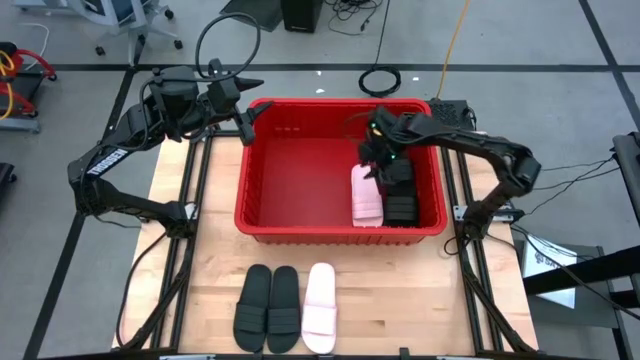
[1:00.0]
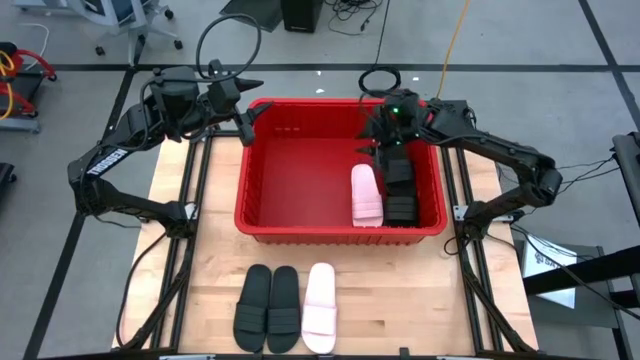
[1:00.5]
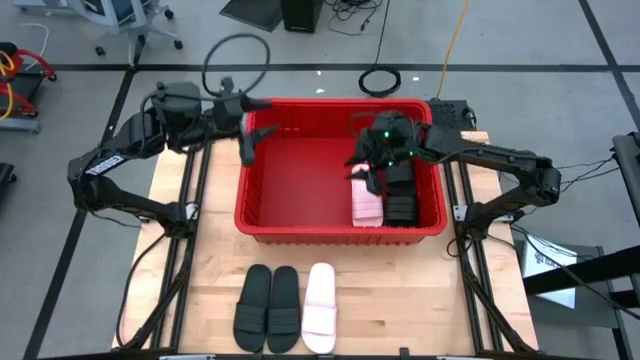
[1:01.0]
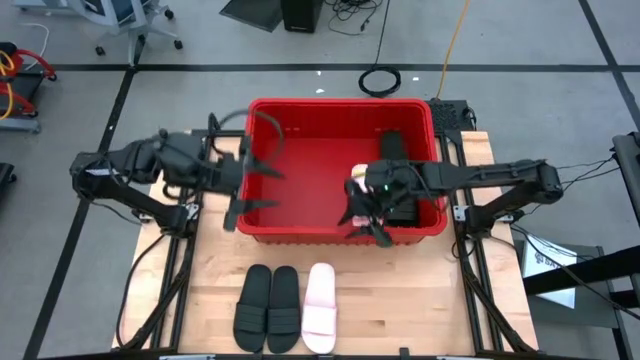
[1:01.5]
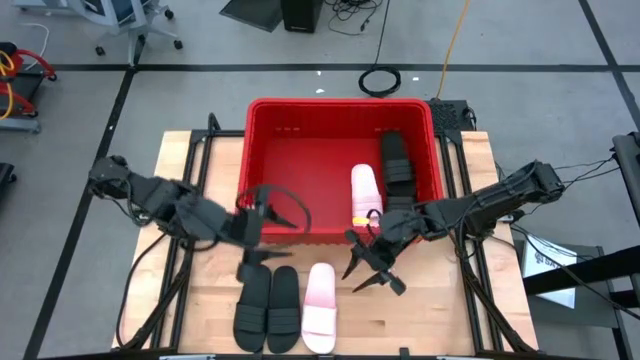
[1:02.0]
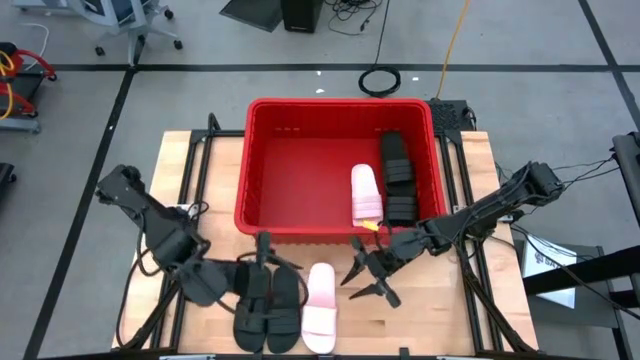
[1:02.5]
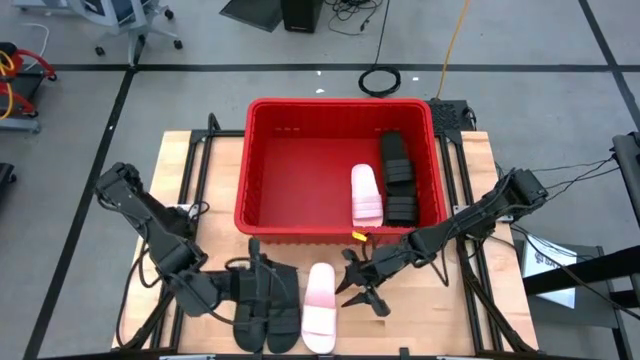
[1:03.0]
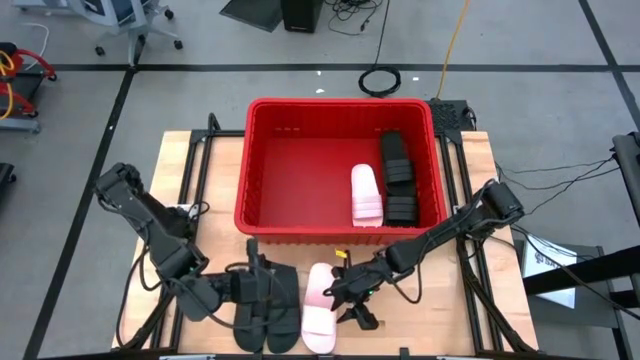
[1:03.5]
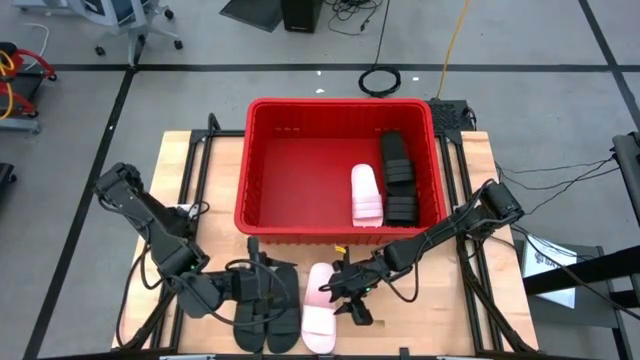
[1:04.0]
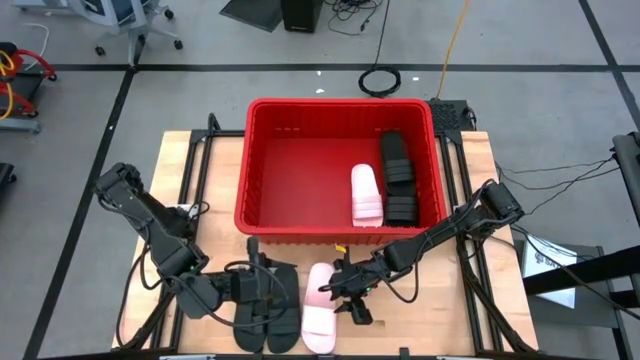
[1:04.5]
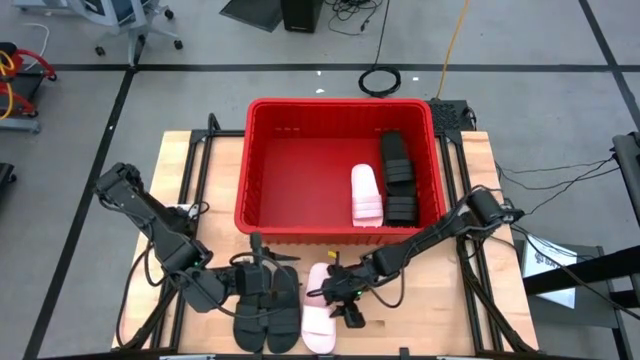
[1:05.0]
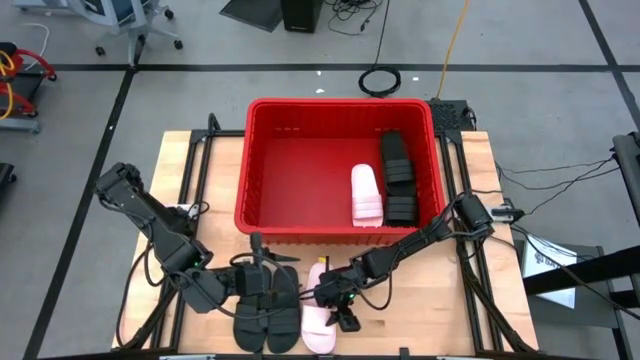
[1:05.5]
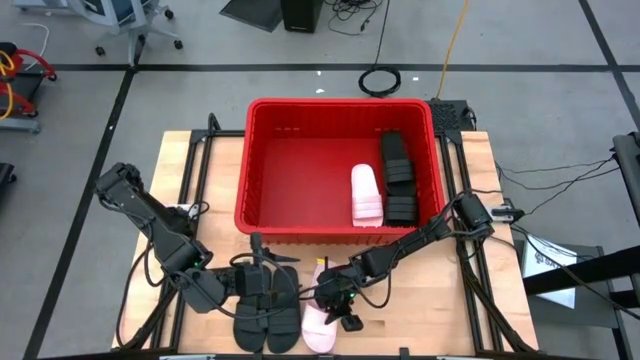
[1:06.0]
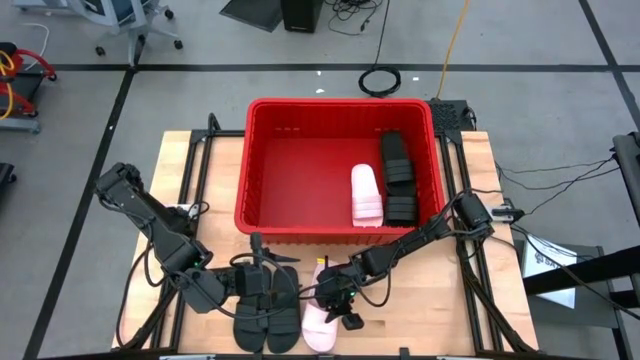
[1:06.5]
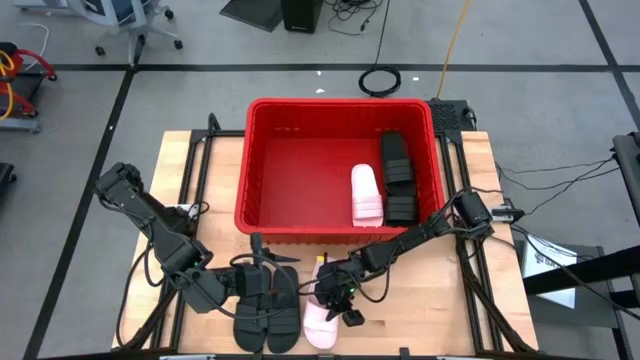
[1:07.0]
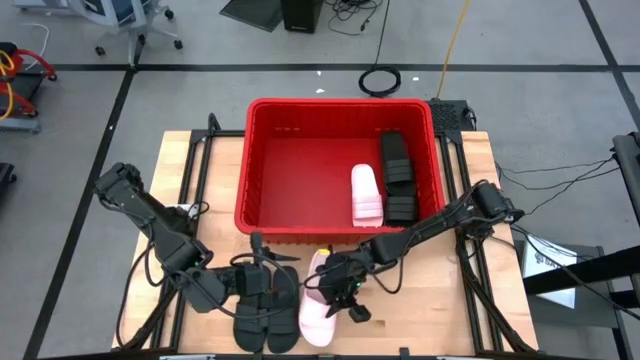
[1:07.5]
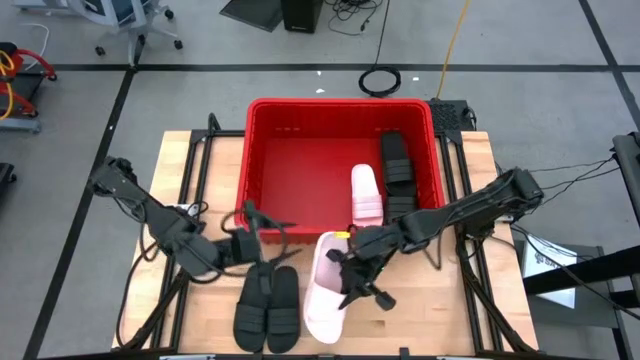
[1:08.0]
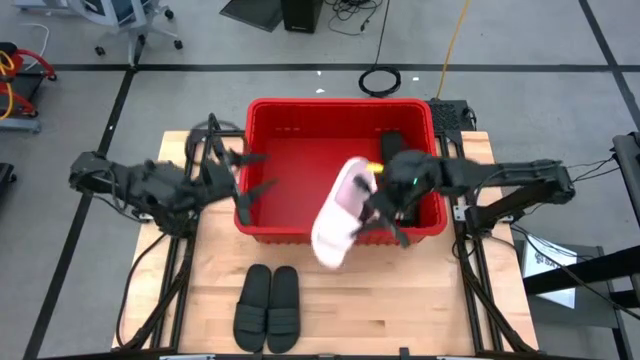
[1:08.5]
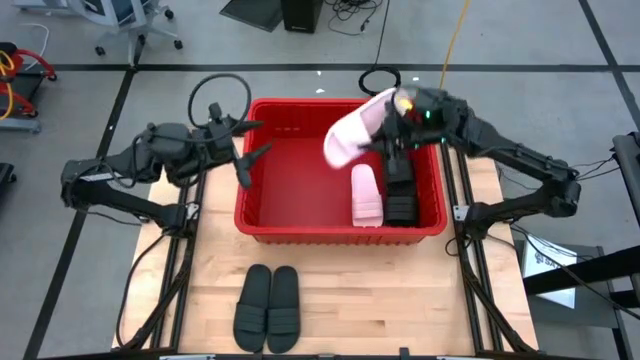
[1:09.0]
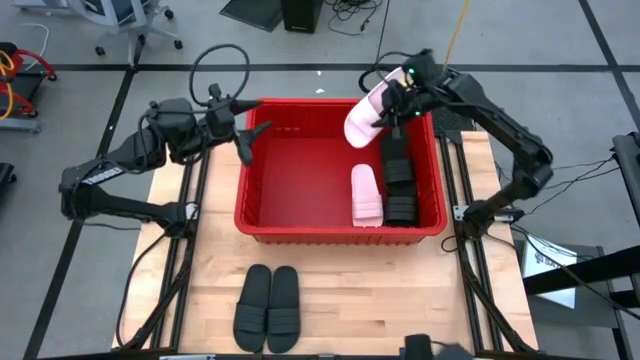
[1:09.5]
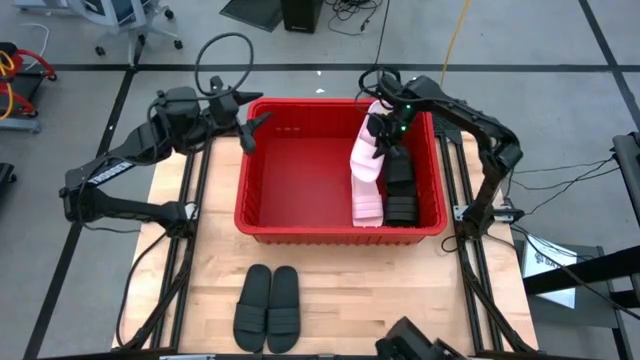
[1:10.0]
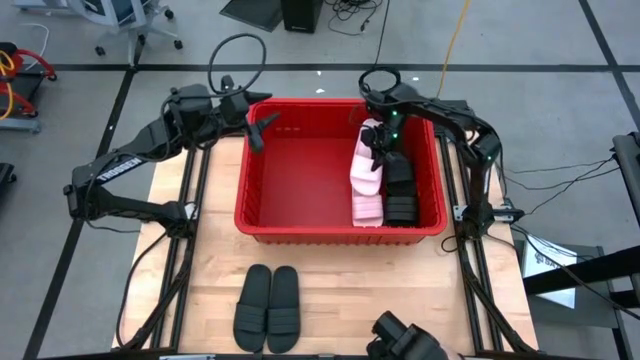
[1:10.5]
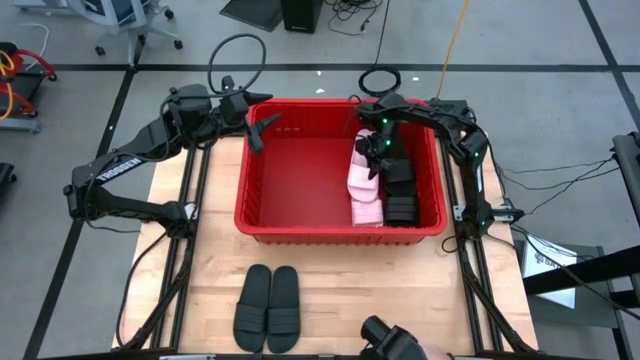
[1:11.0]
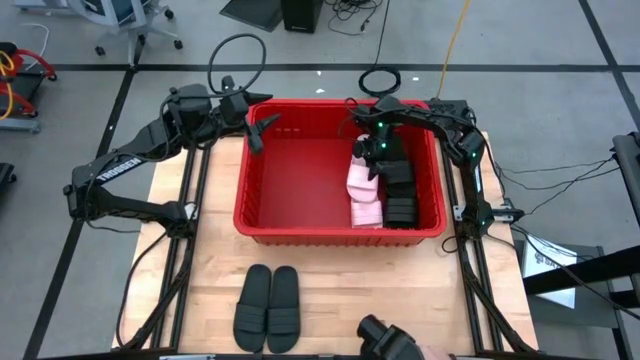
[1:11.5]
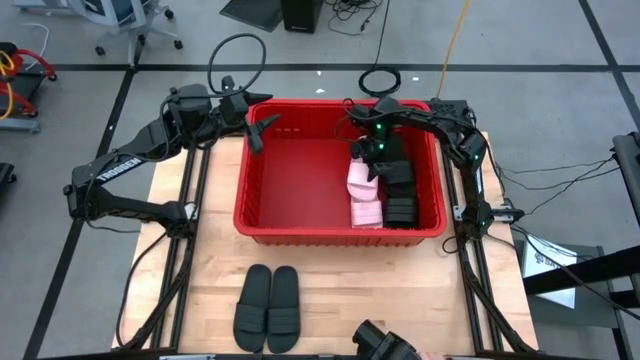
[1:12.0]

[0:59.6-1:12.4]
Task: Pick and place slides into bin
Put the pink slide into the red bin

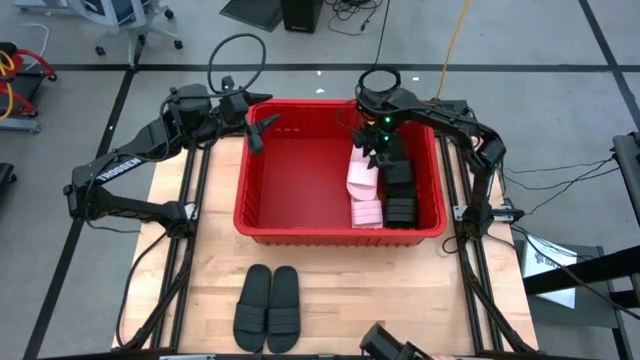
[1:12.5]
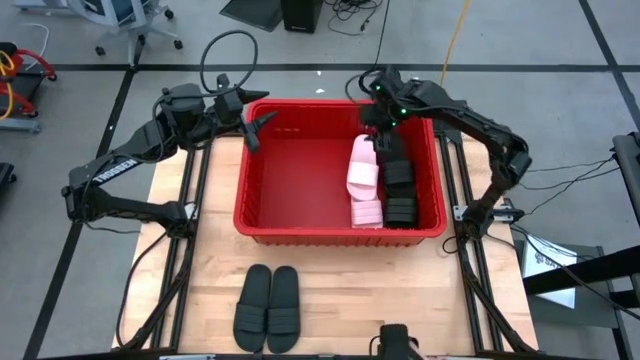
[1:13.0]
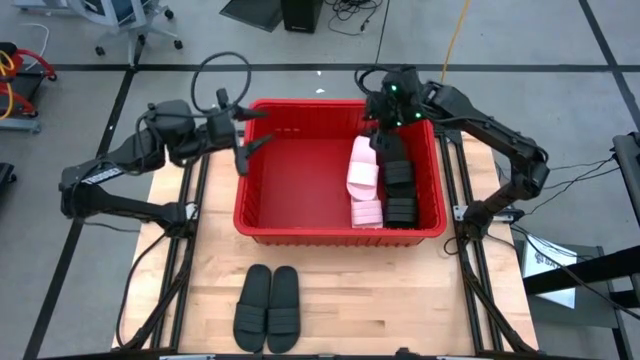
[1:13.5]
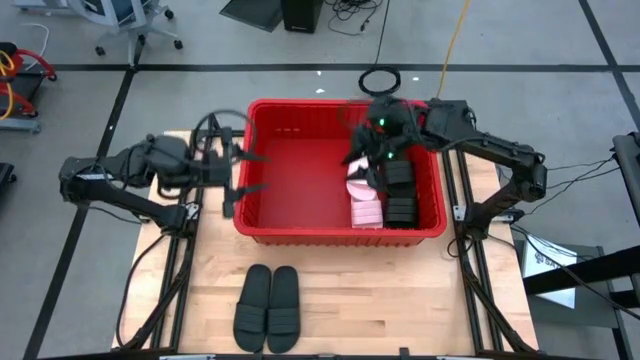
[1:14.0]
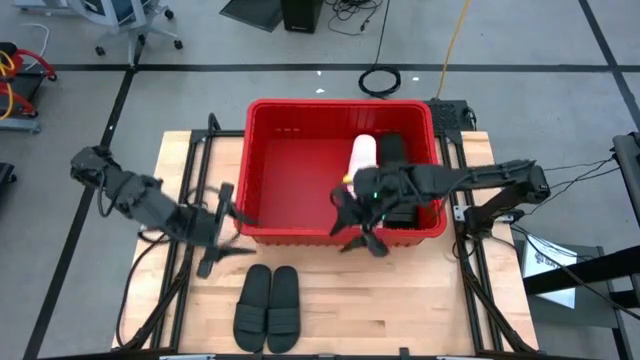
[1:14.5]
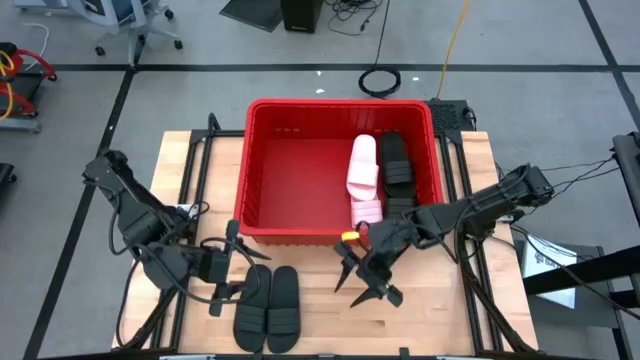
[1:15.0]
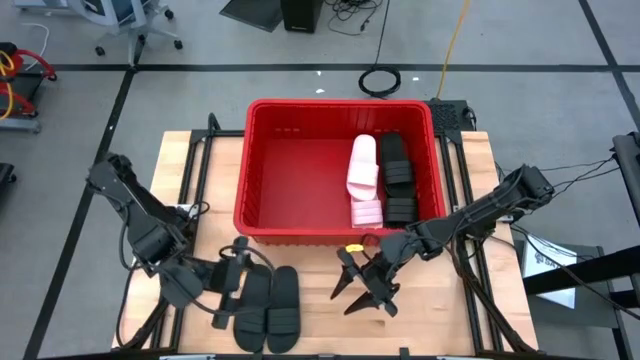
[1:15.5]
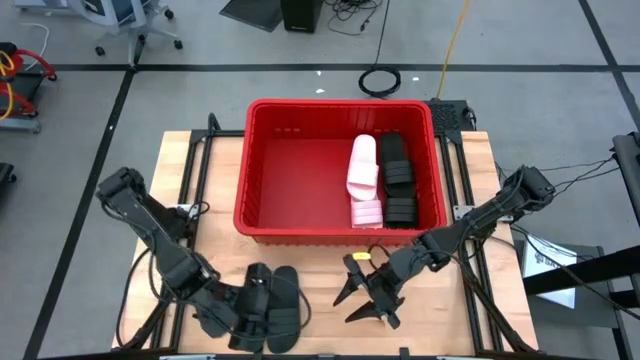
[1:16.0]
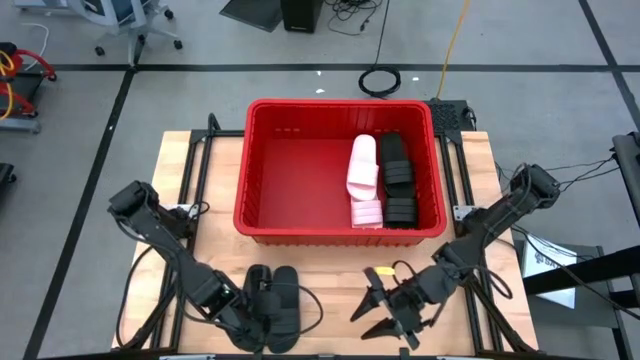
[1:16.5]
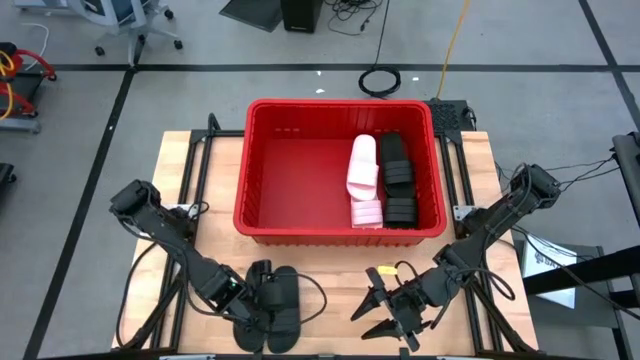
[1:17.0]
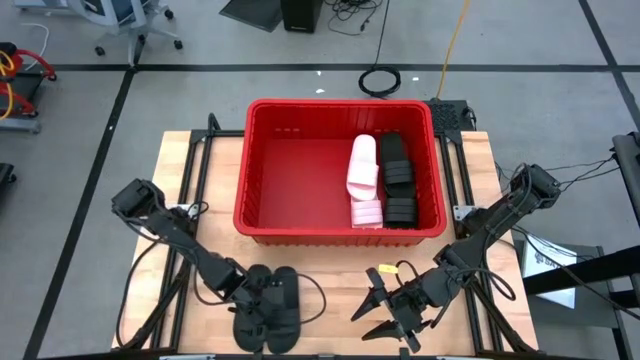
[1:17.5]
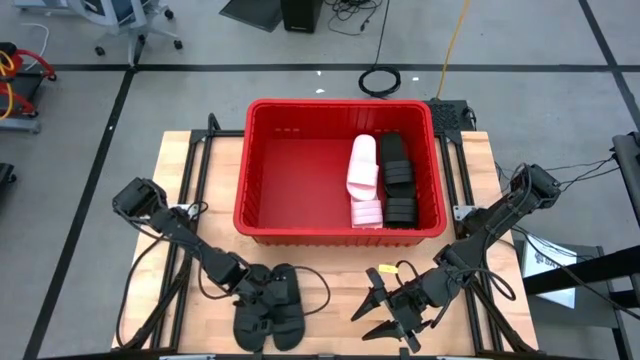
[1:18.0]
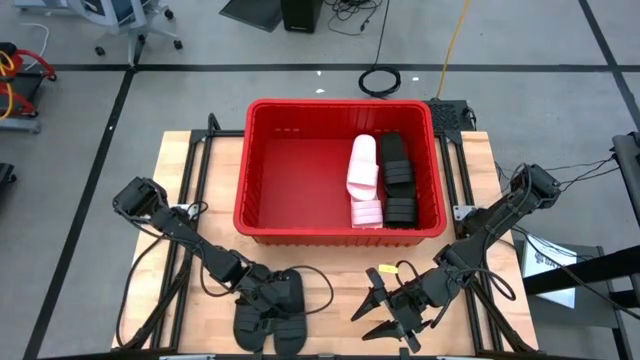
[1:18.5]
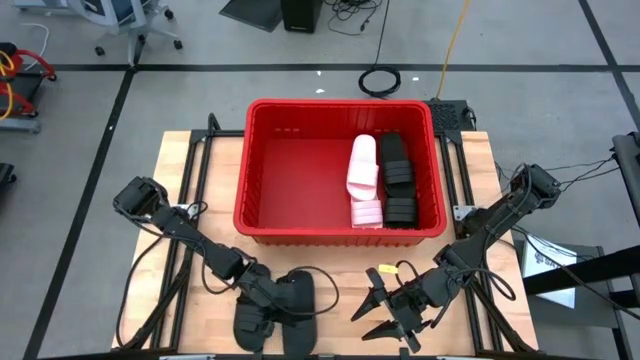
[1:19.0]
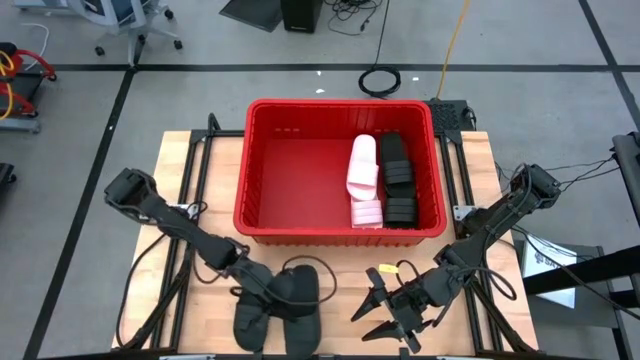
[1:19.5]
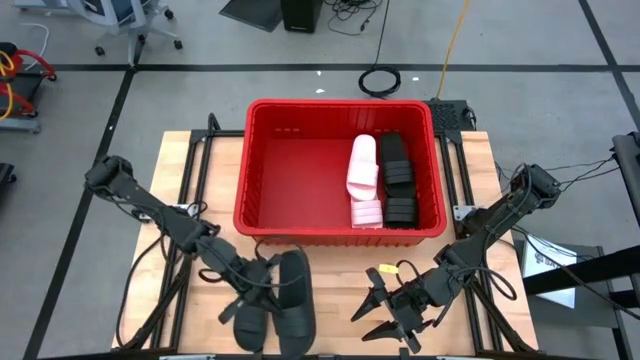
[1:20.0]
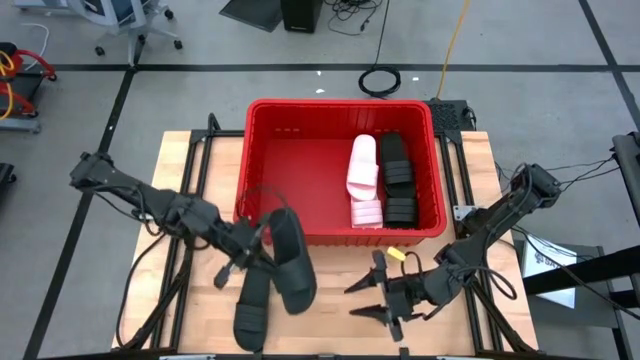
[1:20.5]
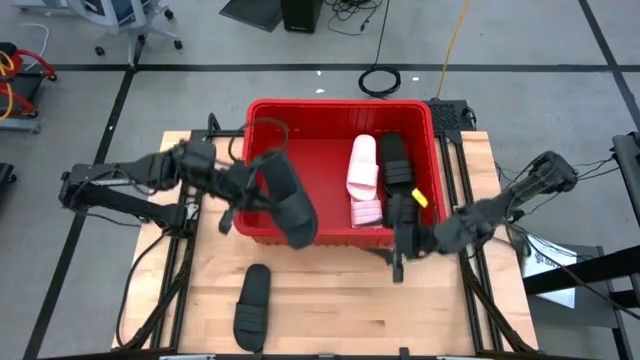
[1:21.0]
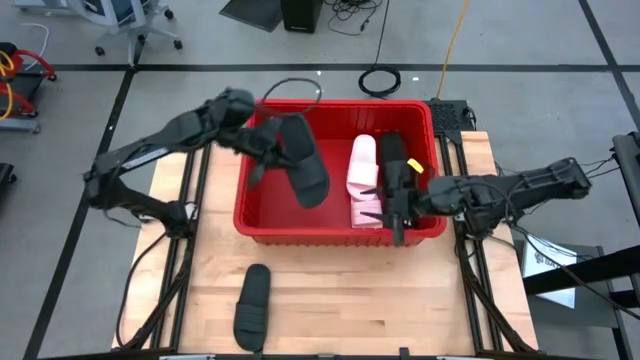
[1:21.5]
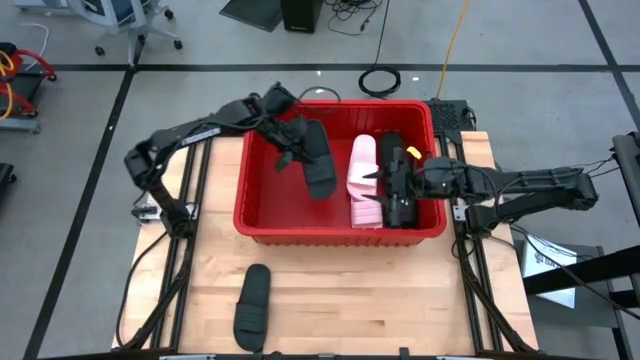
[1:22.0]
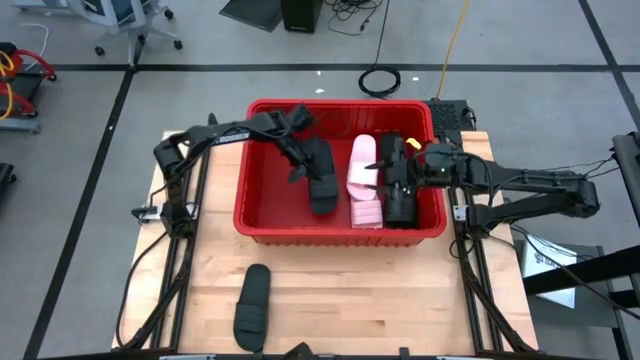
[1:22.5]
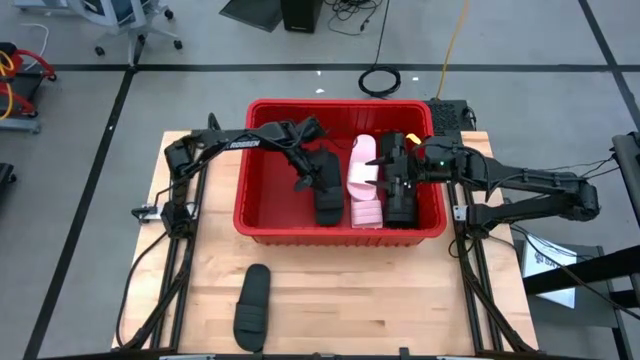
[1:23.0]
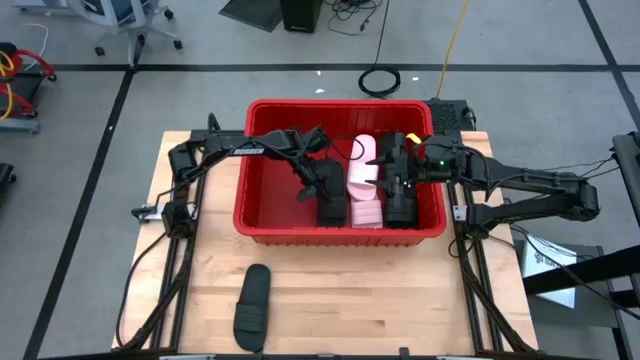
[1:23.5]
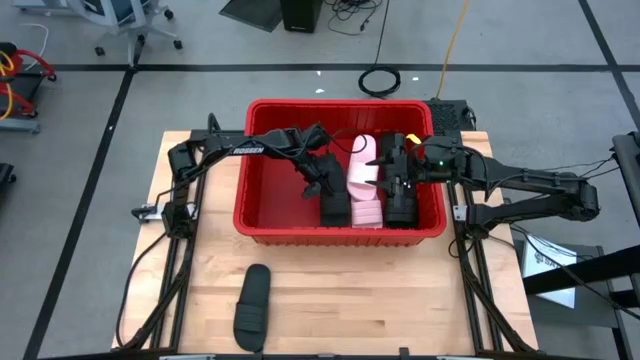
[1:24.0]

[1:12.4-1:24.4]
Put the black slide into the red bin
